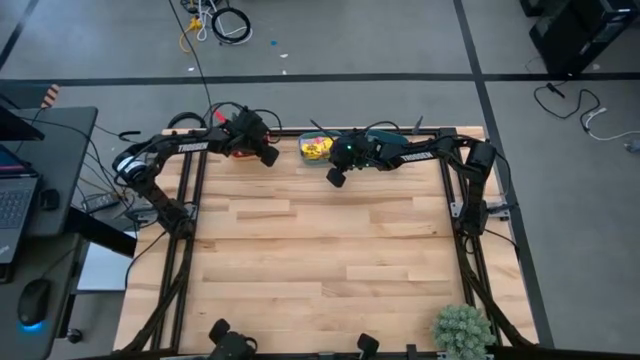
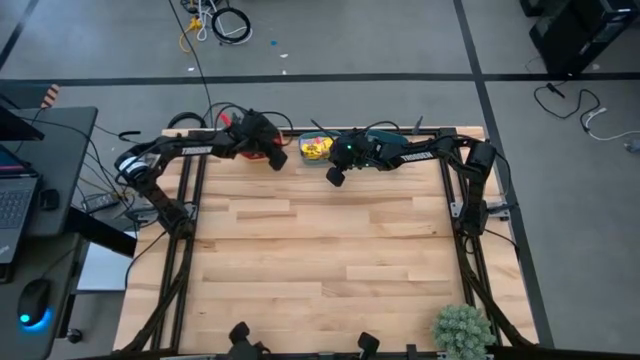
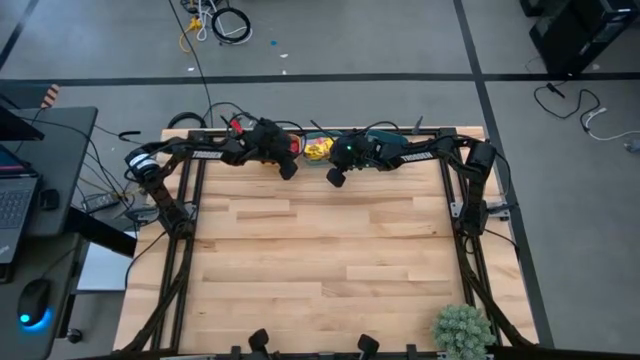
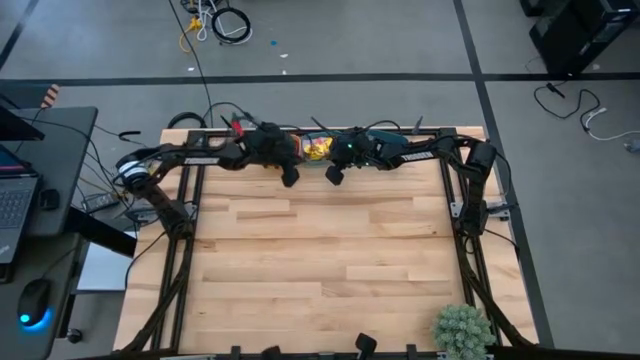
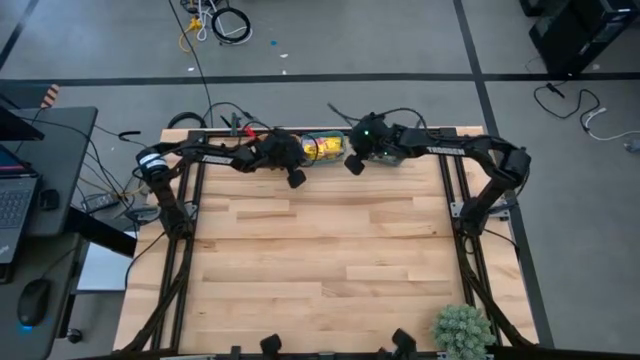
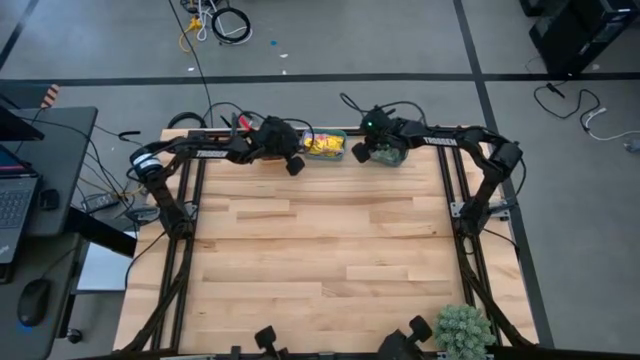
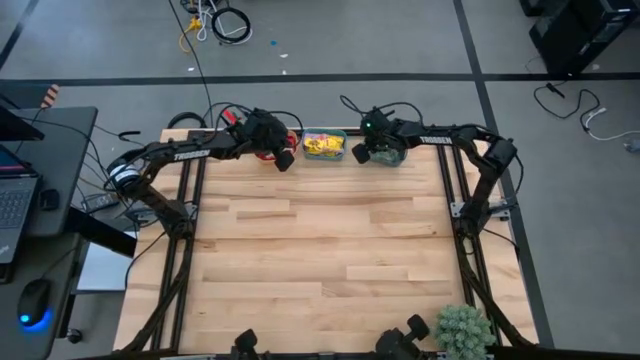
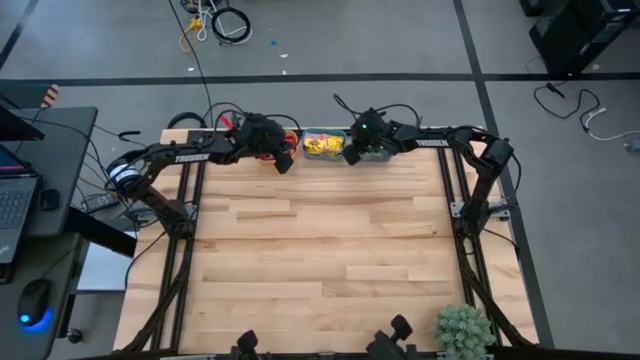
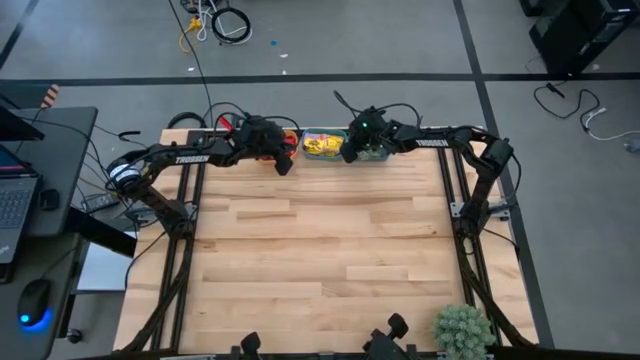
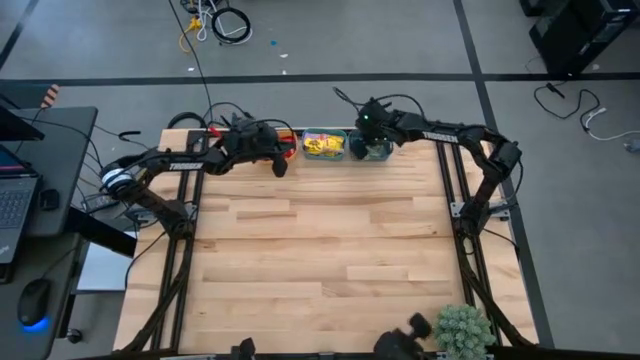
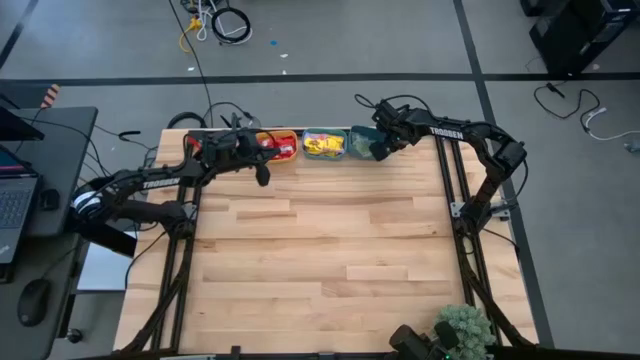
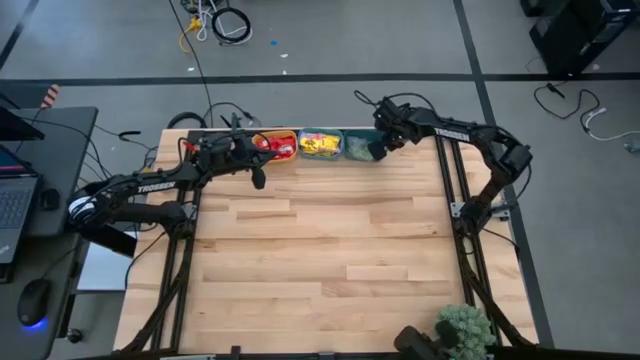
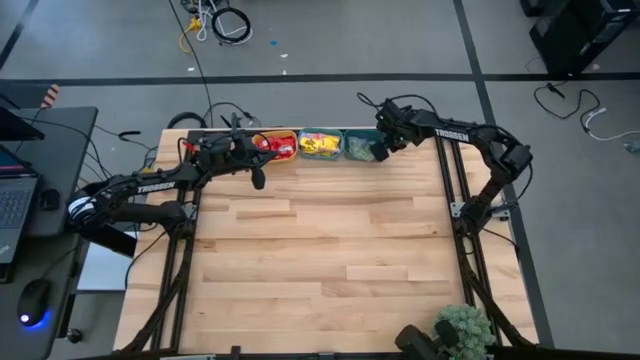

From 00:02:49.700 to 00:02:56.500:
Task: Sort candy
Adjust the bins

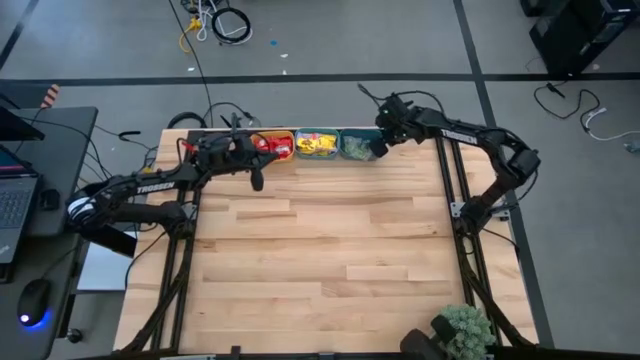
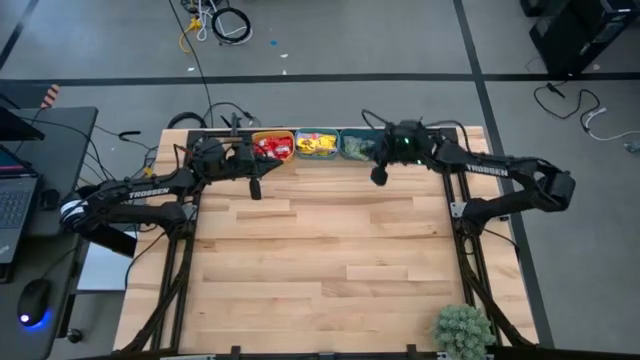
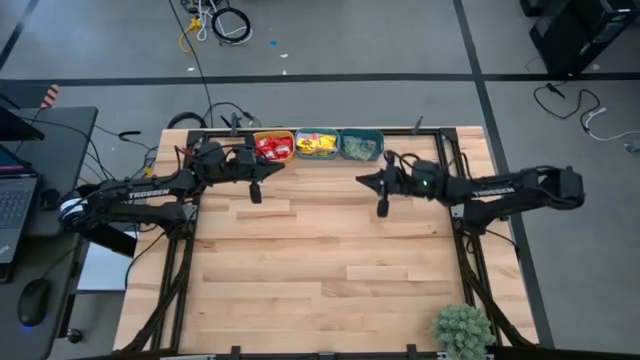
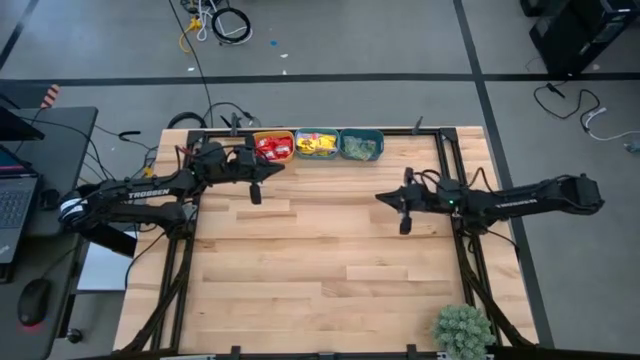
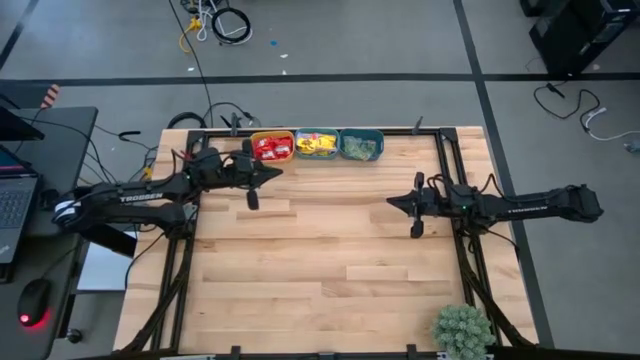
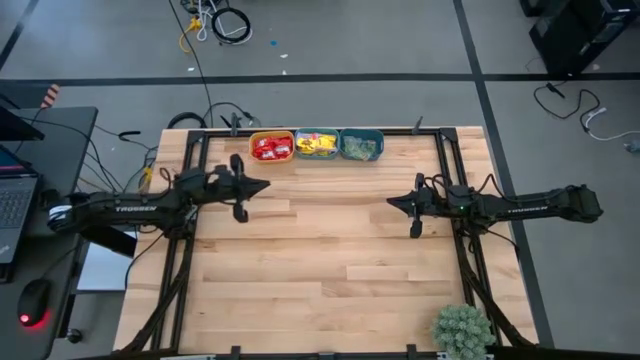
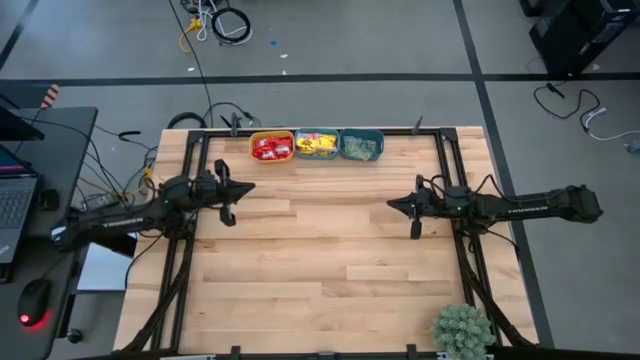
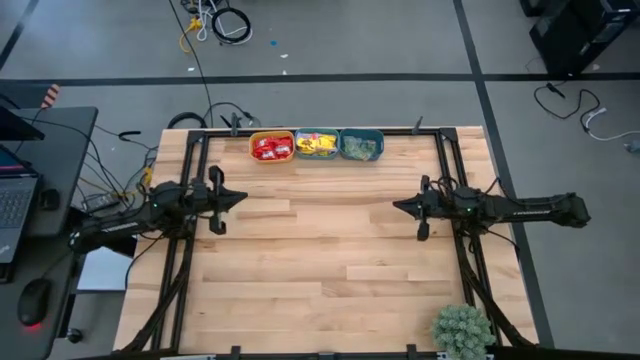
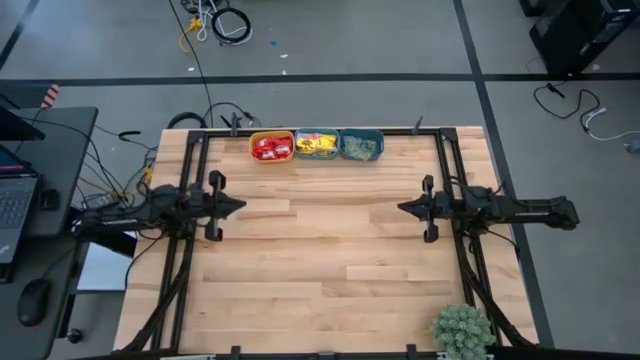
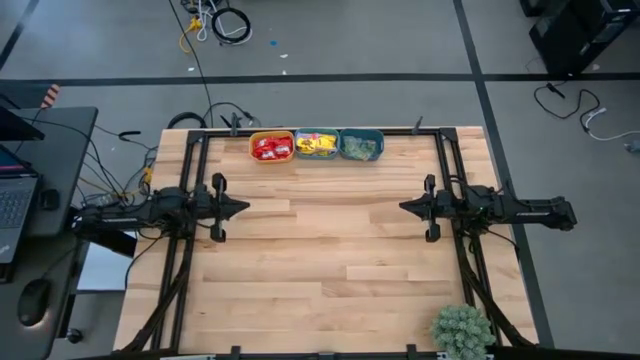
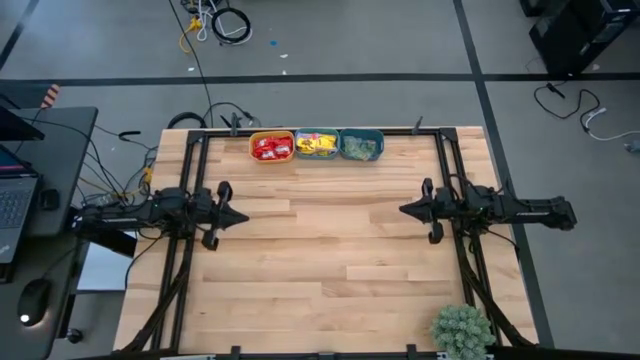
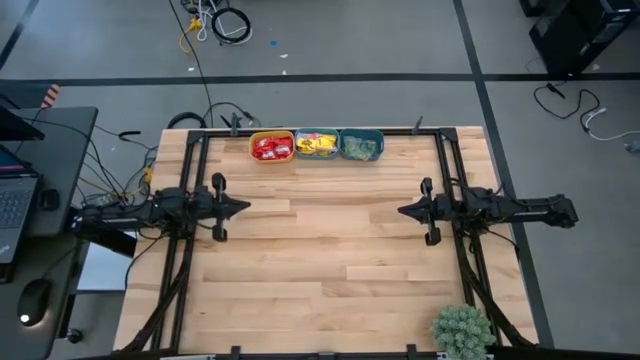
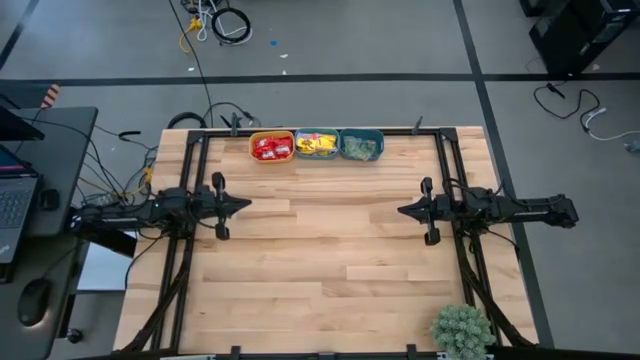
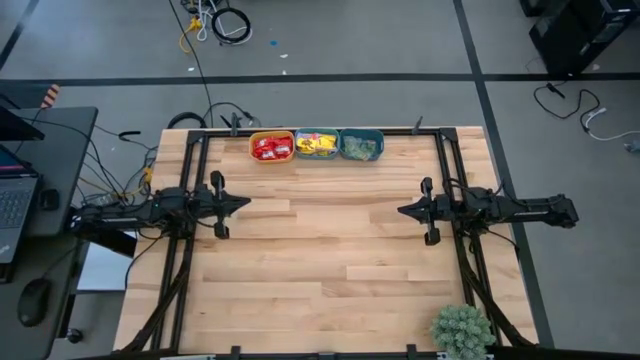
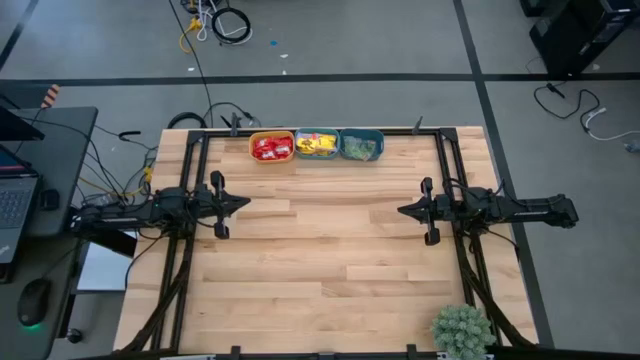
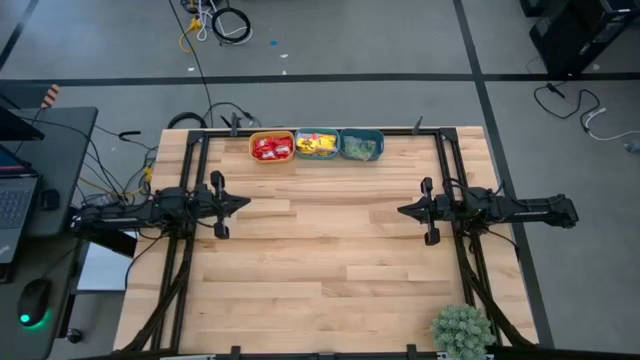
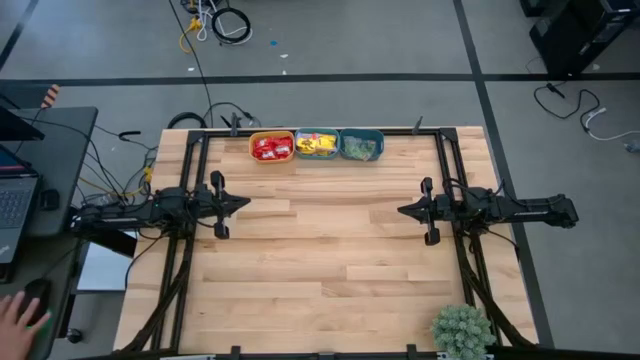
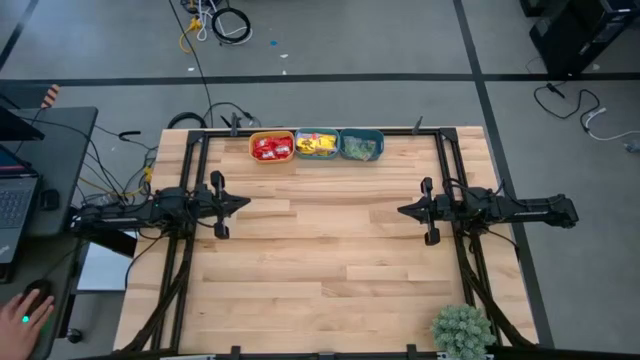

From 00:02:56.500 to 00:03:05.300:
Return to Home Position

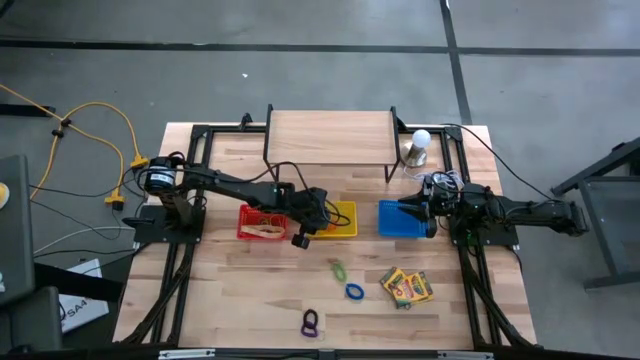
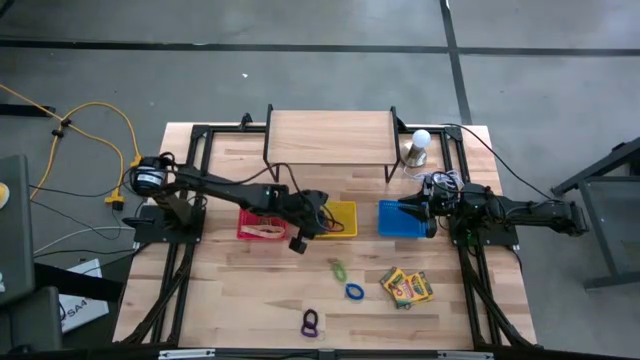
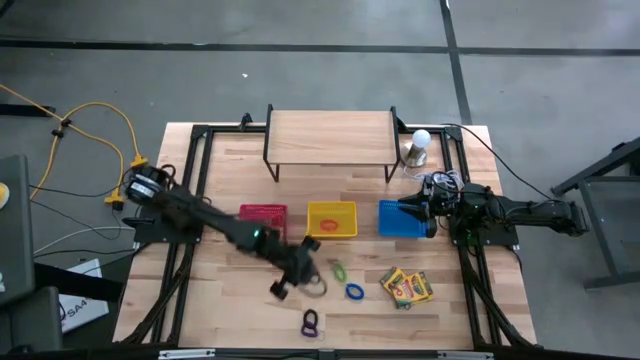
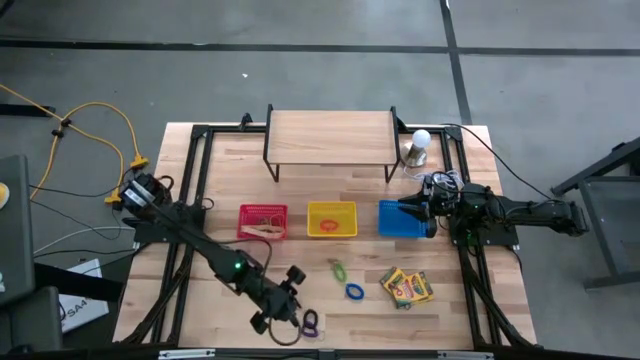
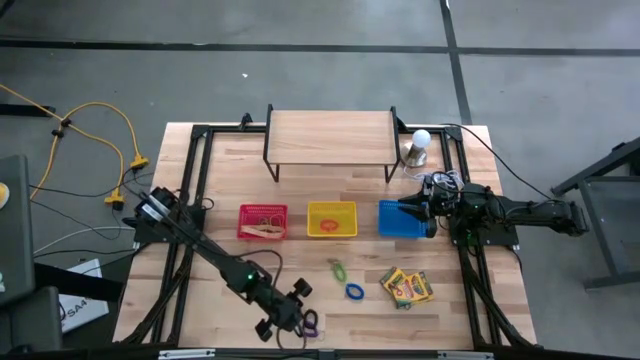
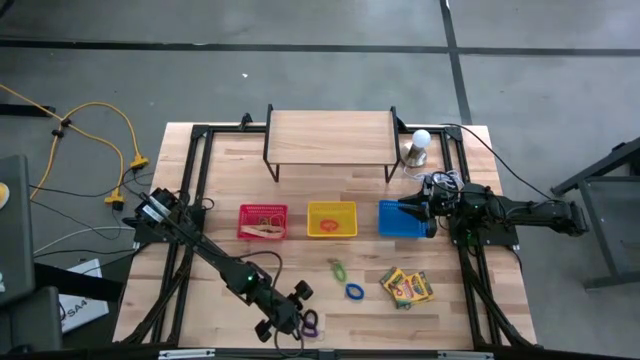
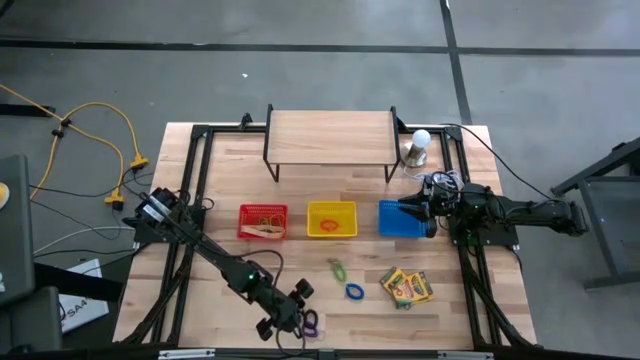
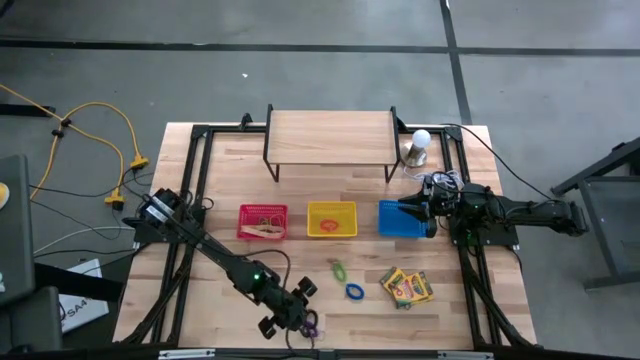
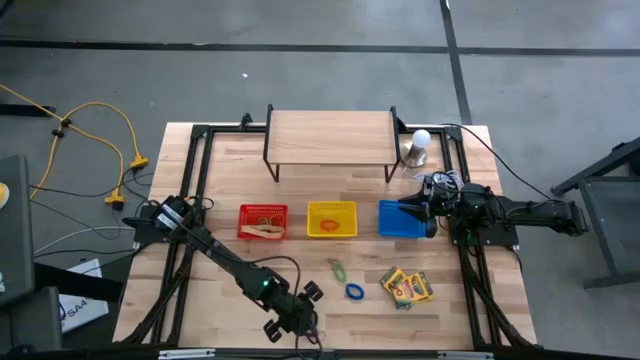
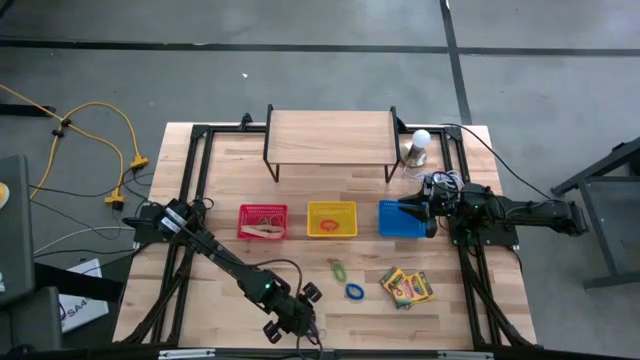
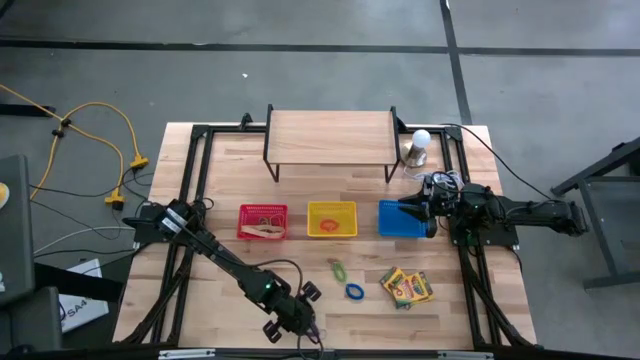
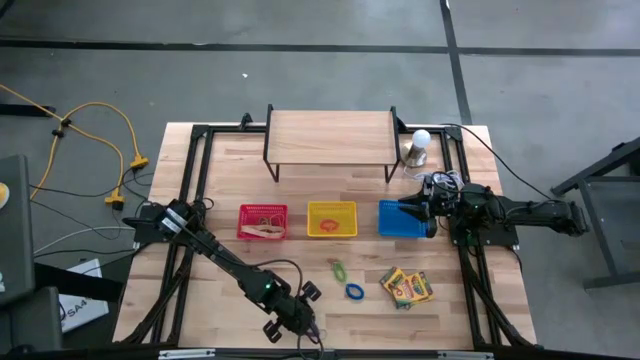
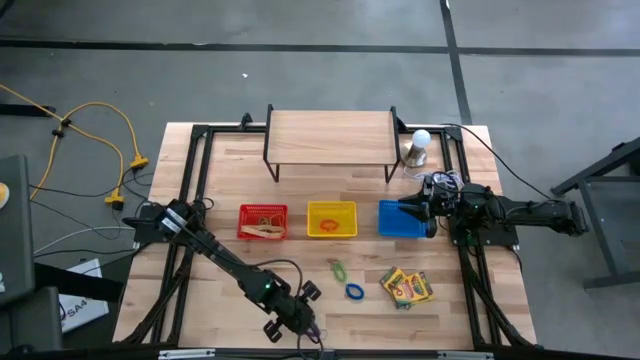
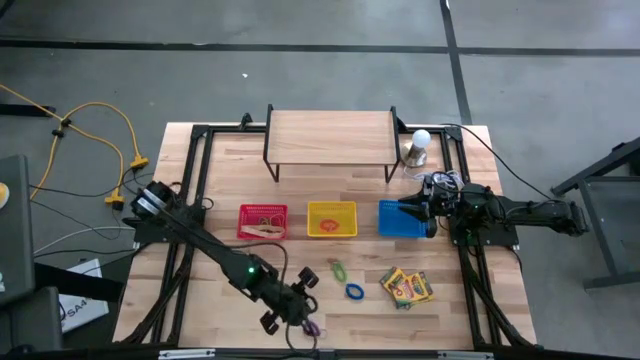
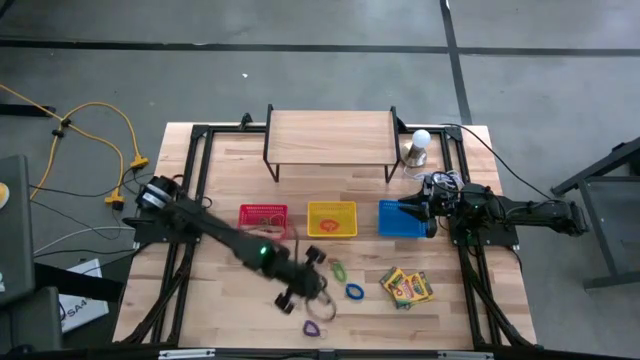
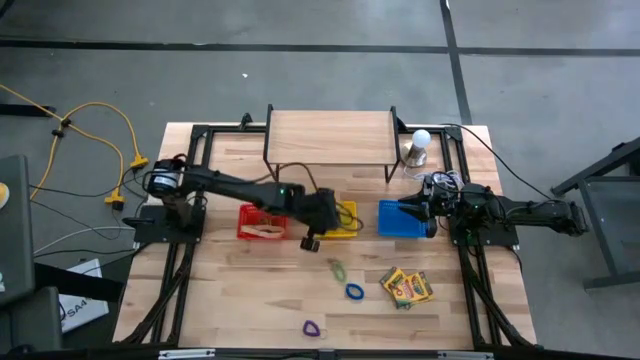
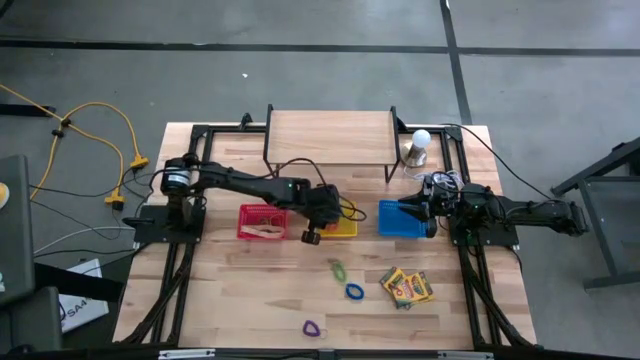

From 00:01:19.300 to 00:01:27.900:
Task: Pick & Place Office Desk Supplies
Put the black spring keychain into the yellow bin
